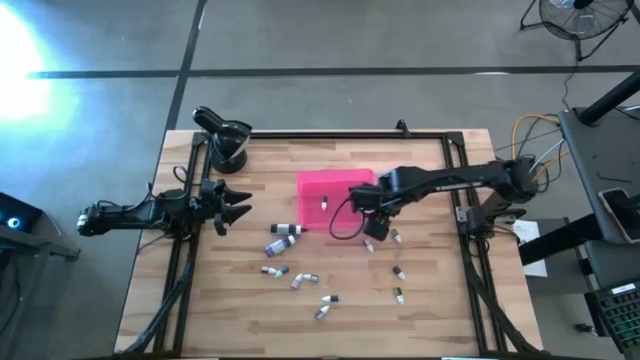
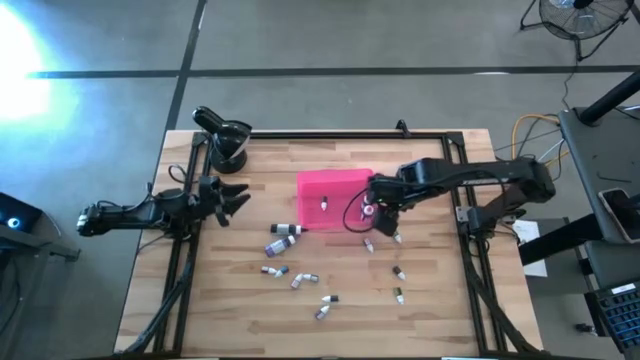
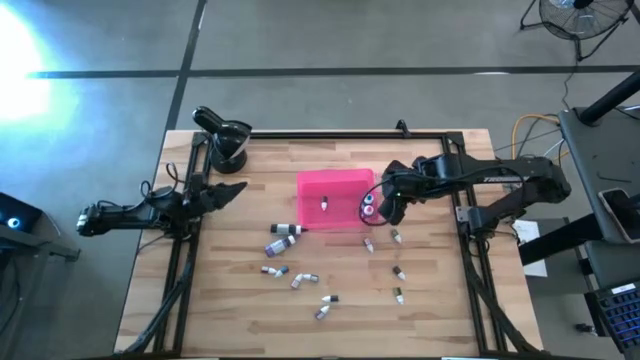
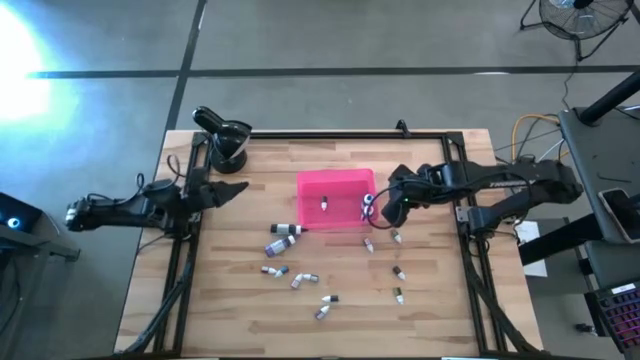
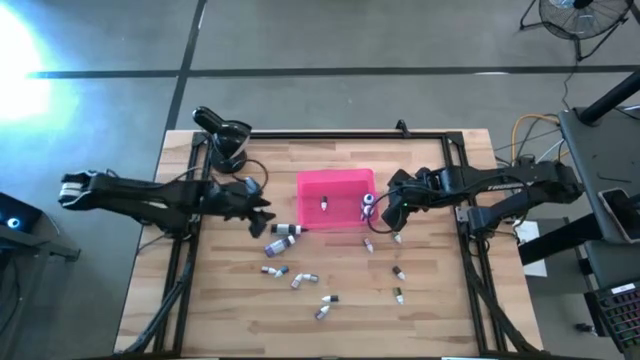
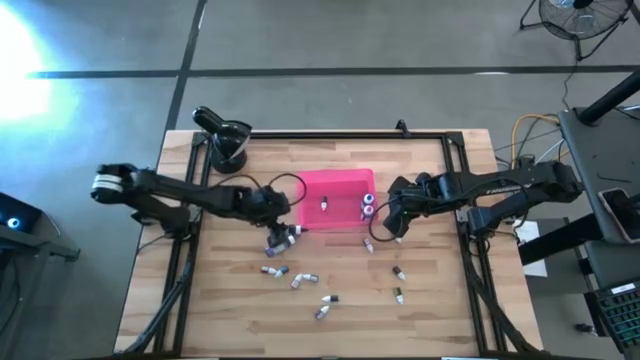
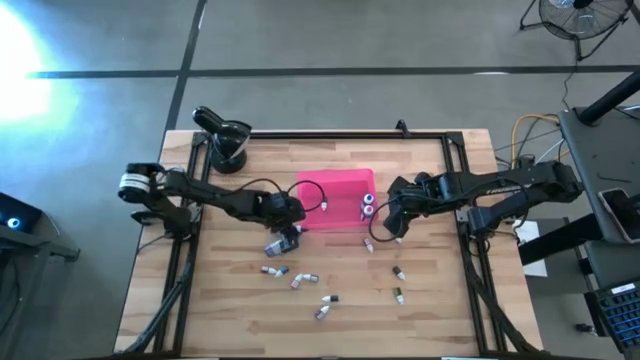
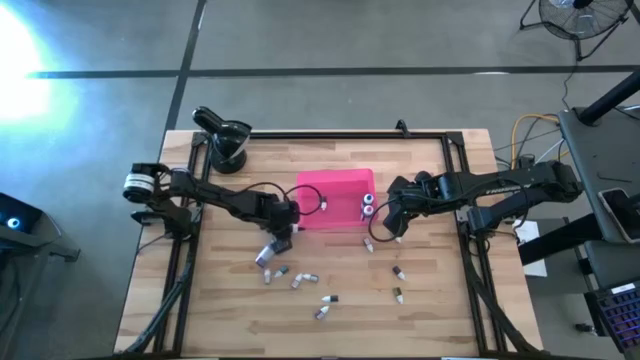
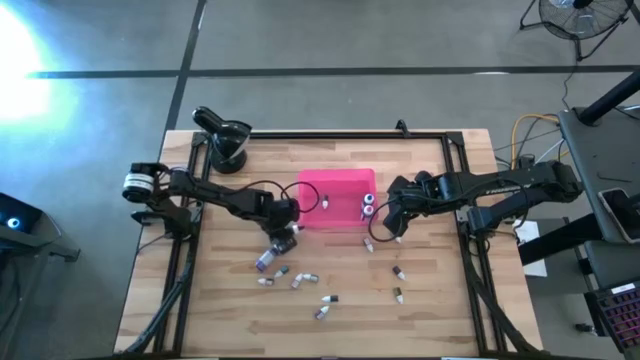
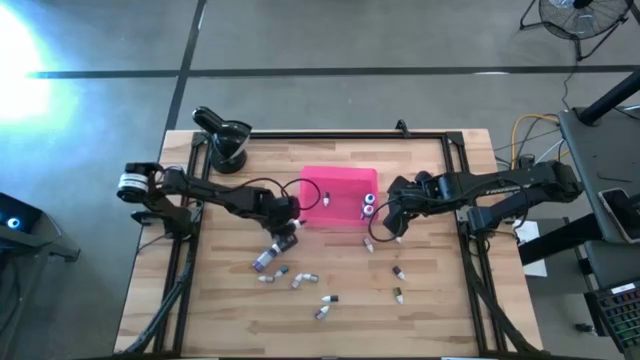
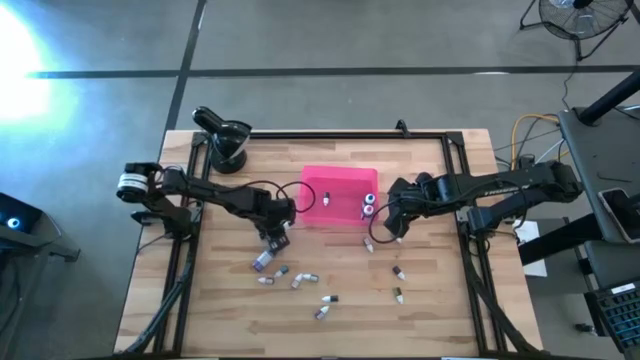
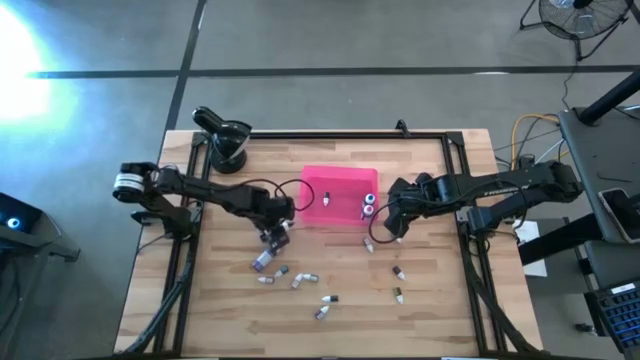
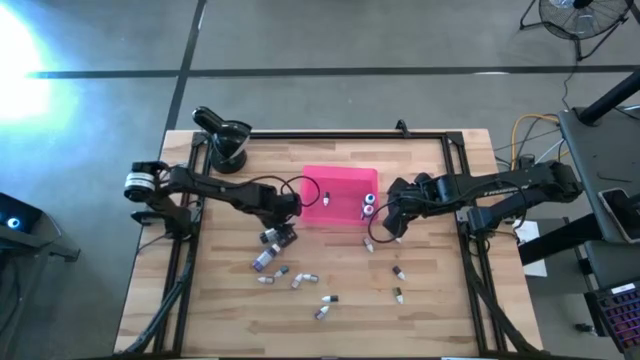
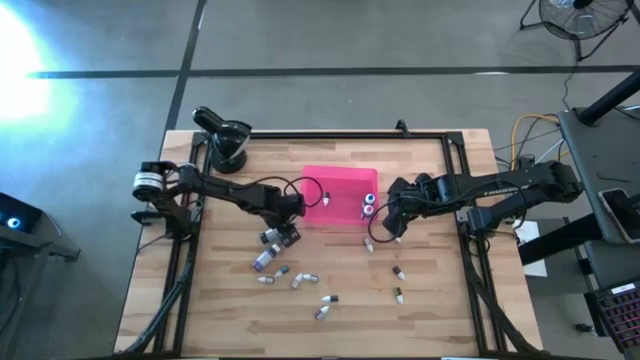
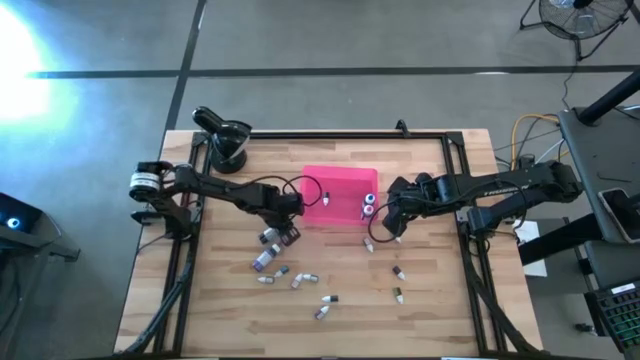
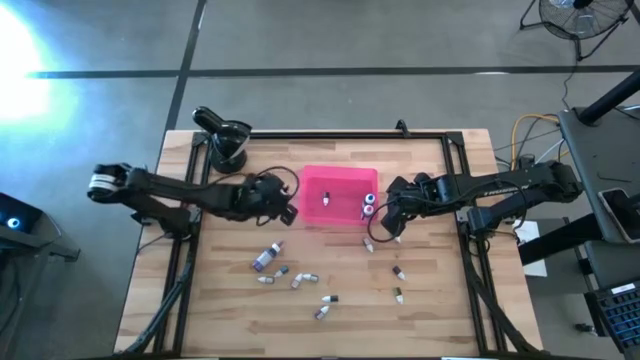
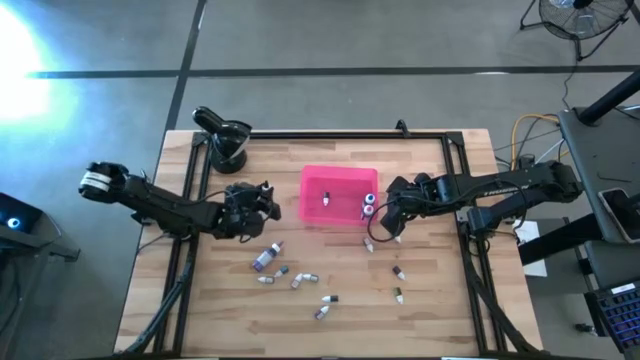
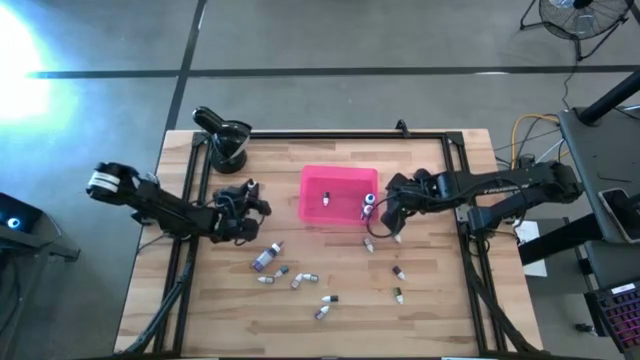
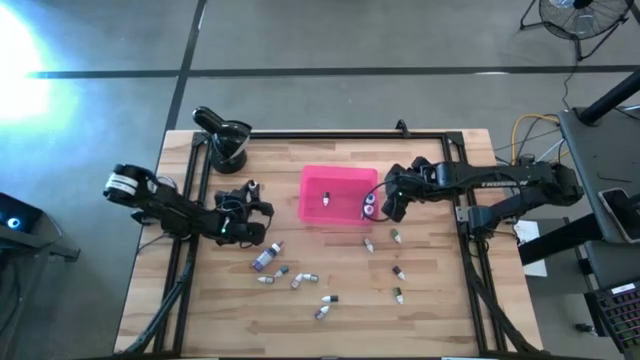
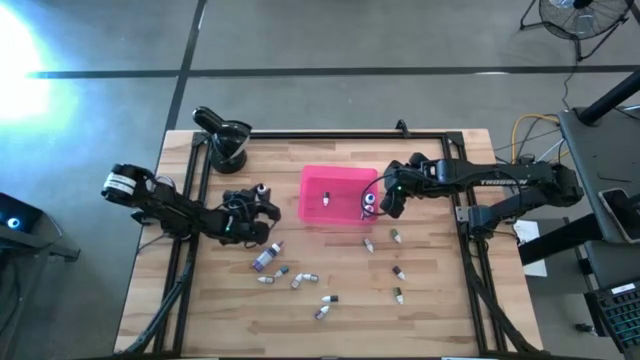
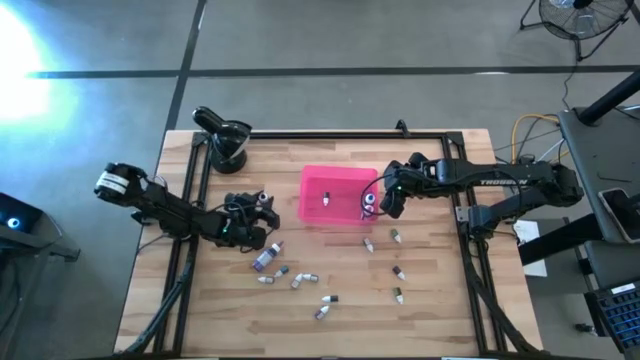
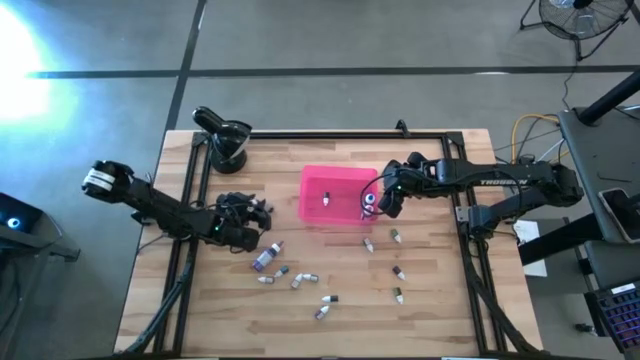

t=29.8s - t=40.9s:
Task: Pick & Place food coloring
Put the large black food coloring bottle into the pink bin

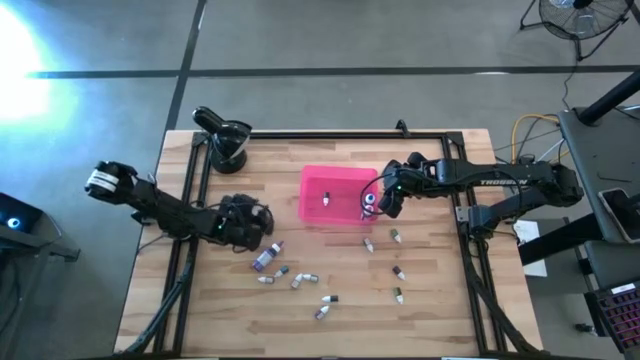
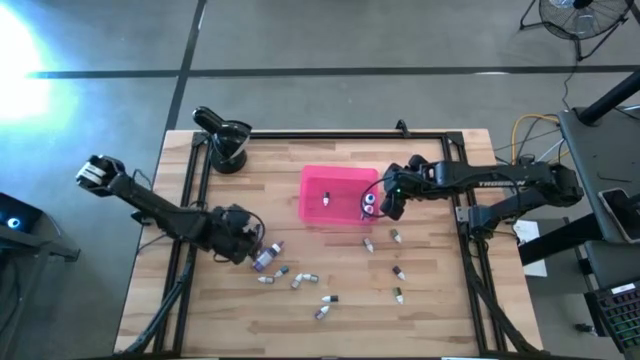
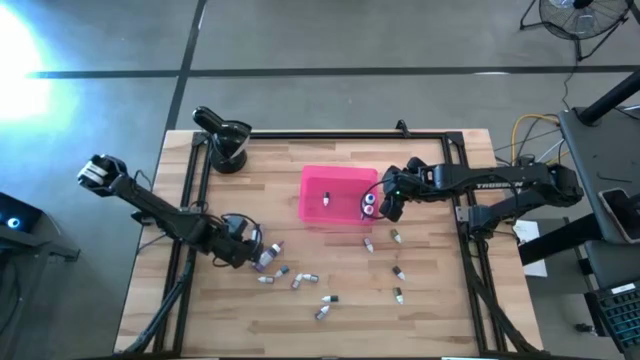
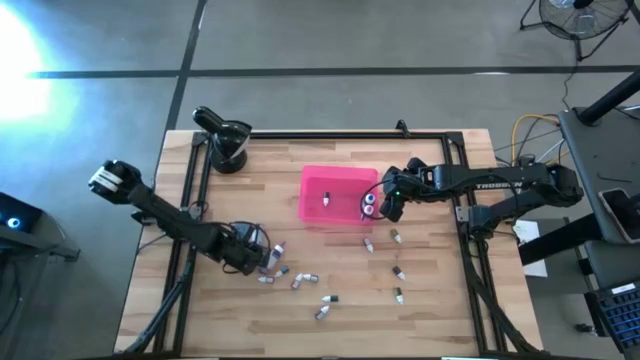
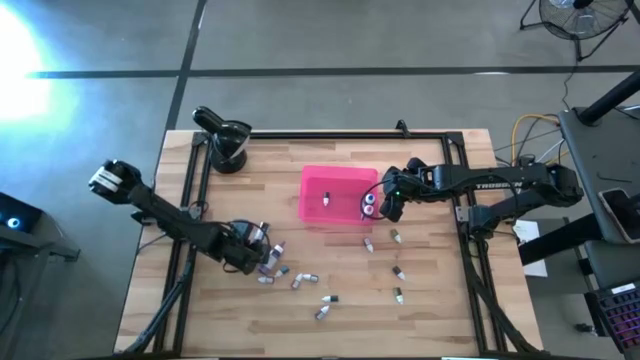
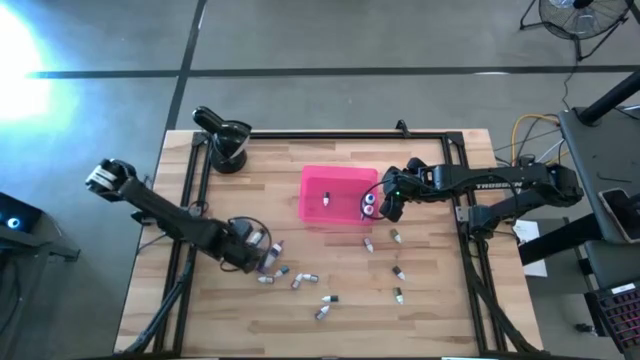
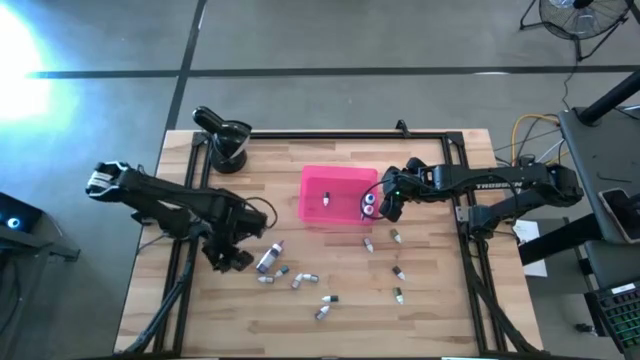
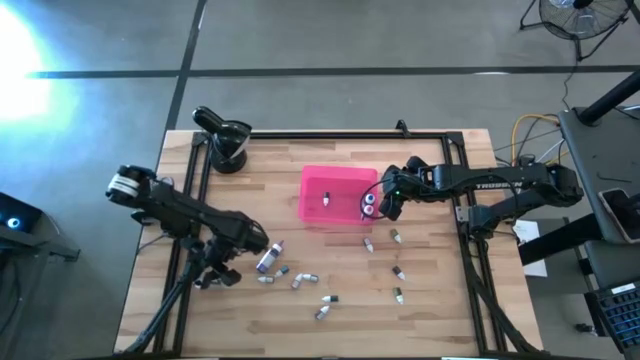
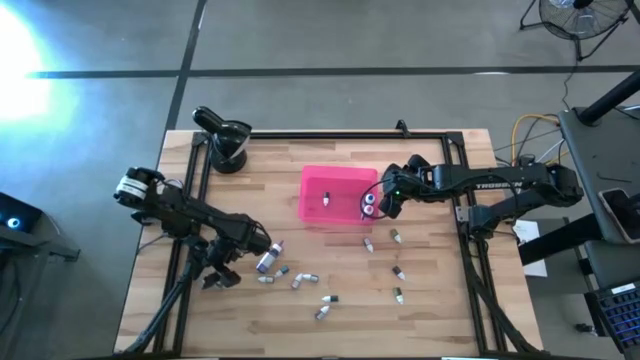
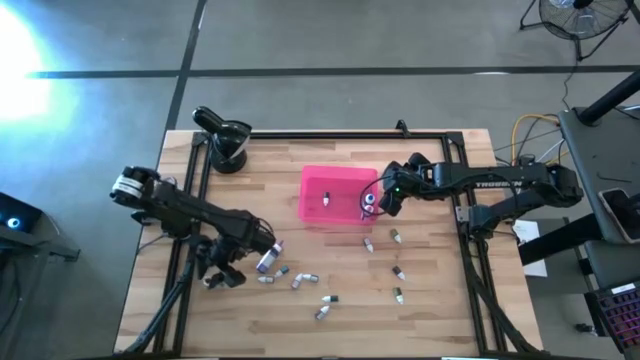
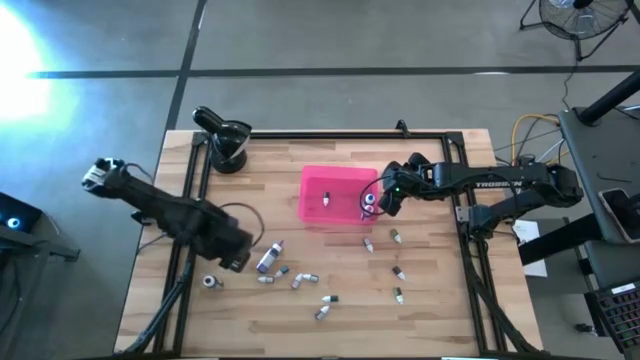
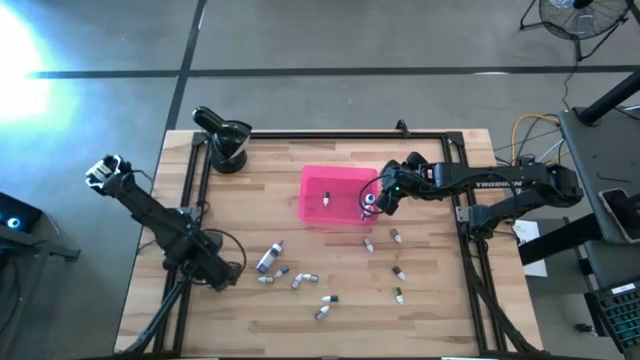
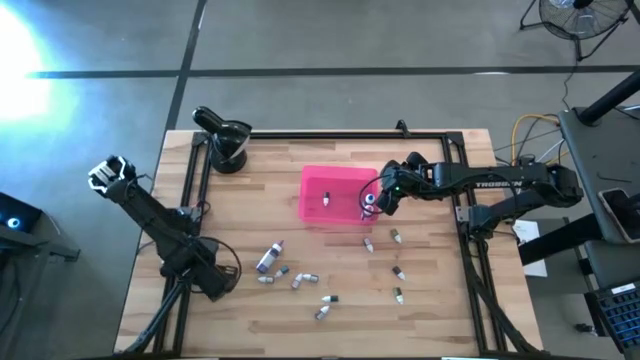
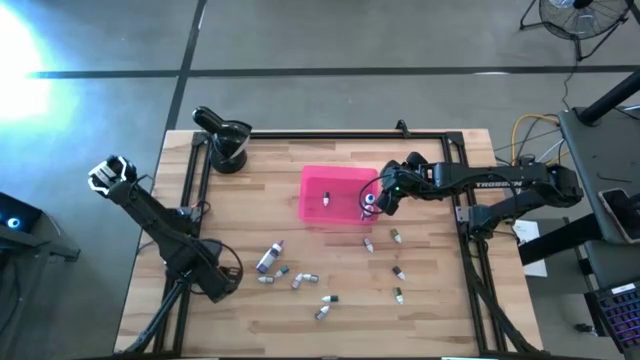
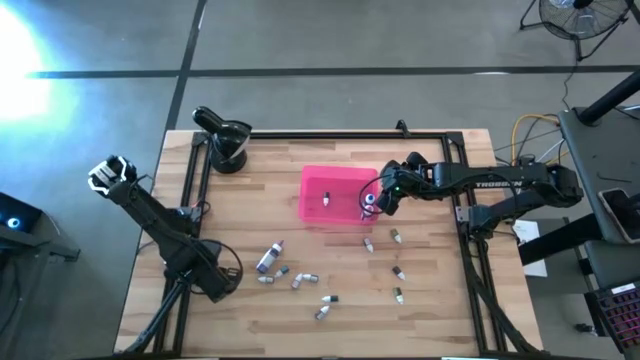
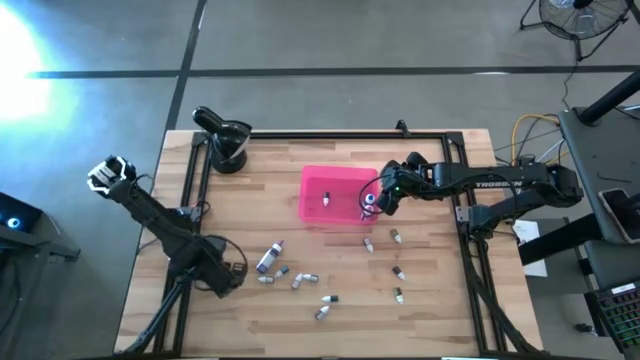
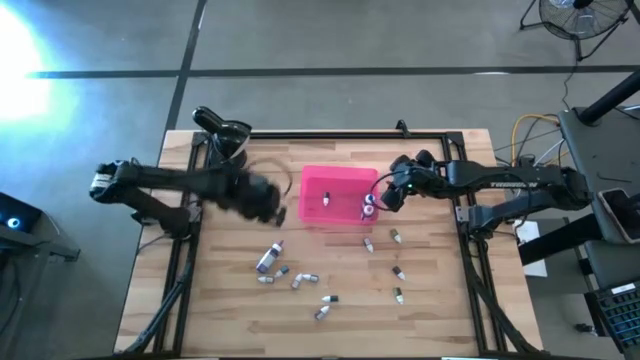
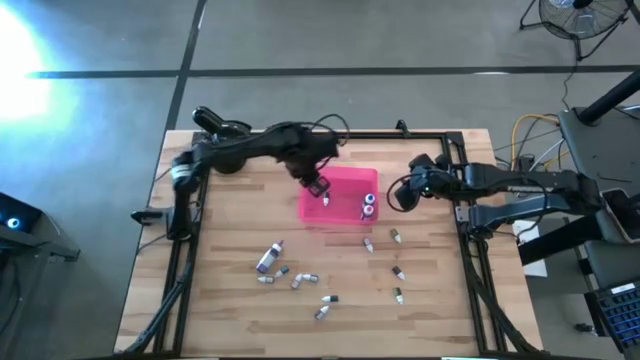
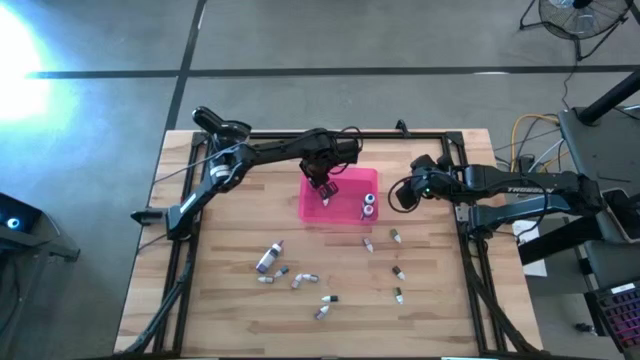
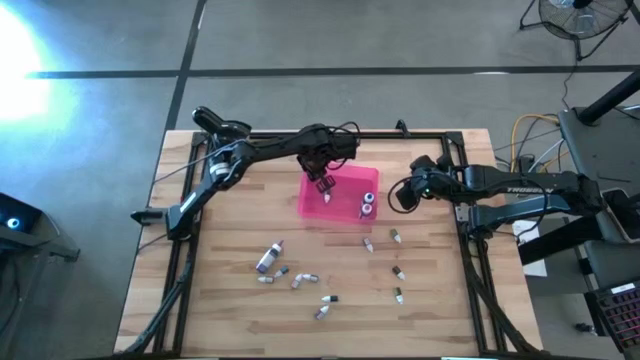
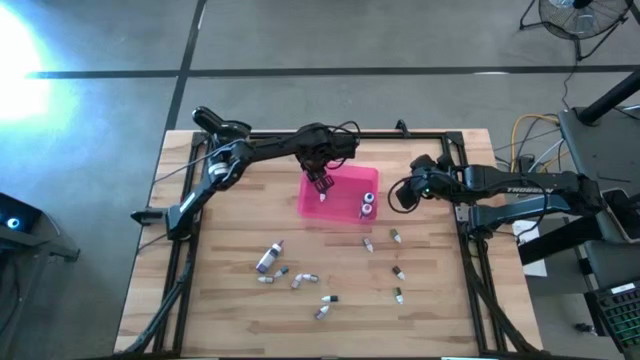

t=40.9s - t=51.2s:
Put the large black food coloring bottle into the pink bin

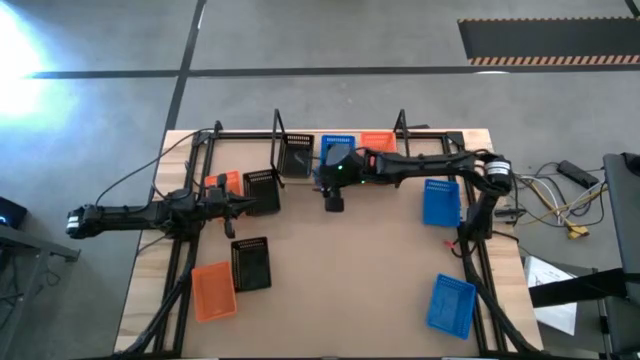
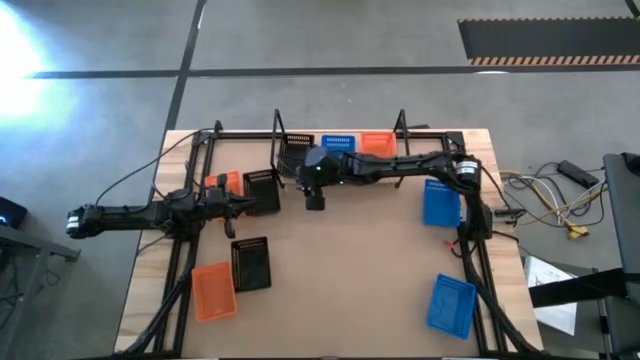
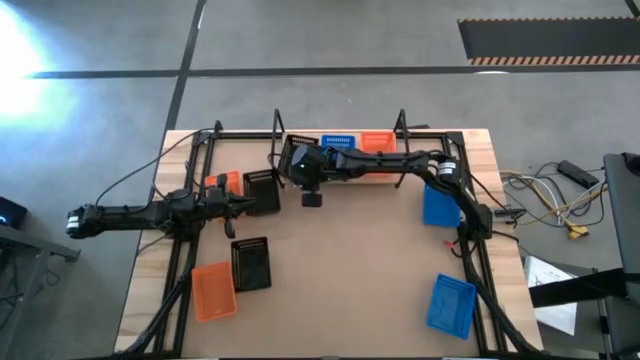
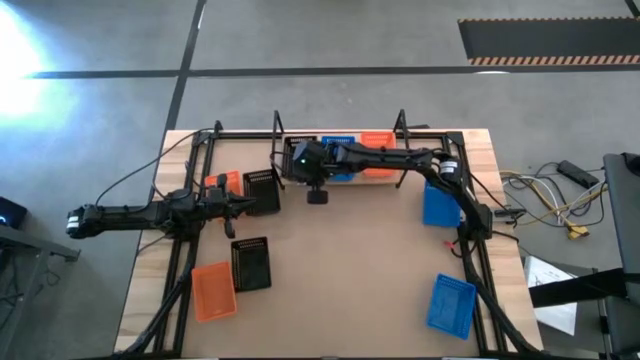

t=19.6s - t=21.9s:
Task: Stack baskets on shelf by color
Adjust the black bin on the shelf
